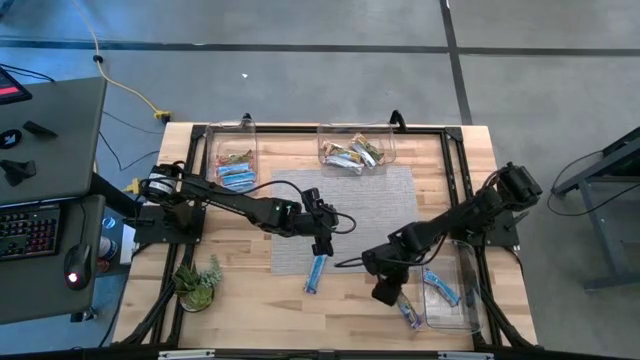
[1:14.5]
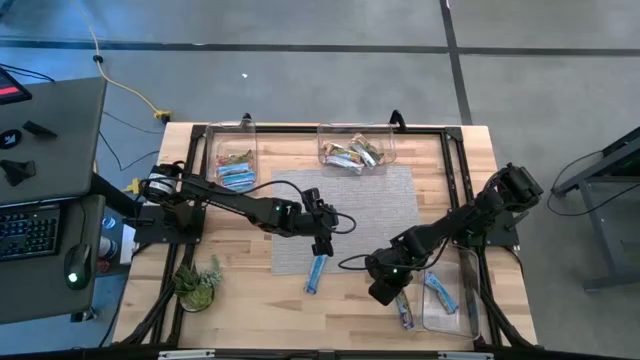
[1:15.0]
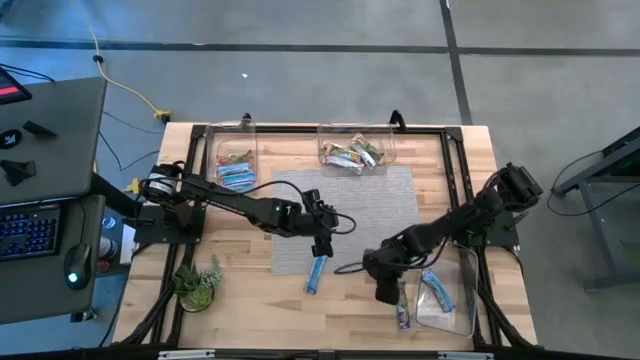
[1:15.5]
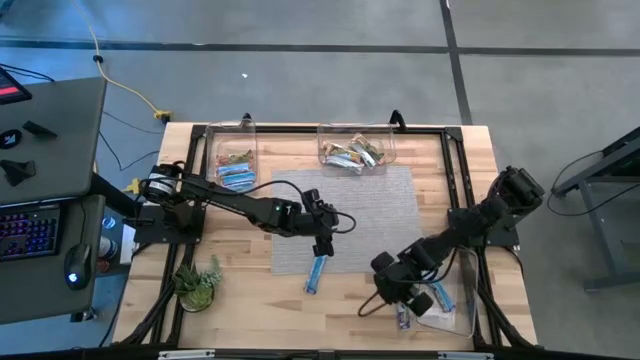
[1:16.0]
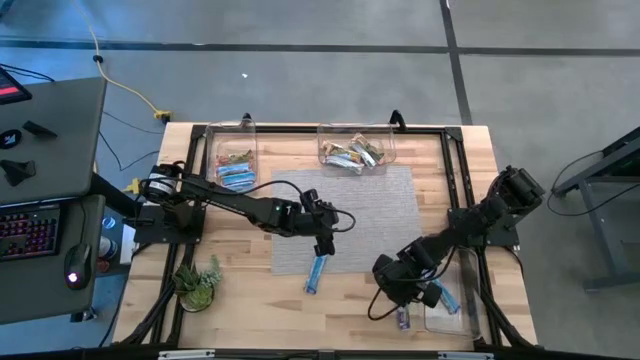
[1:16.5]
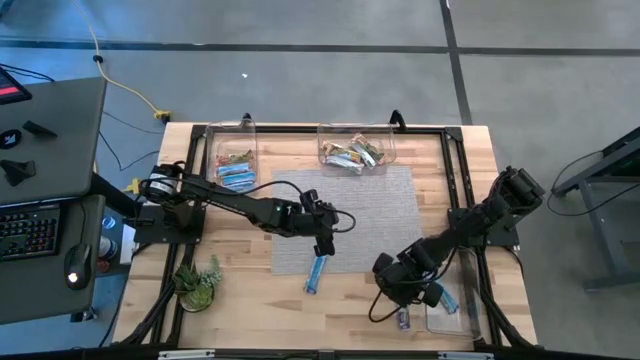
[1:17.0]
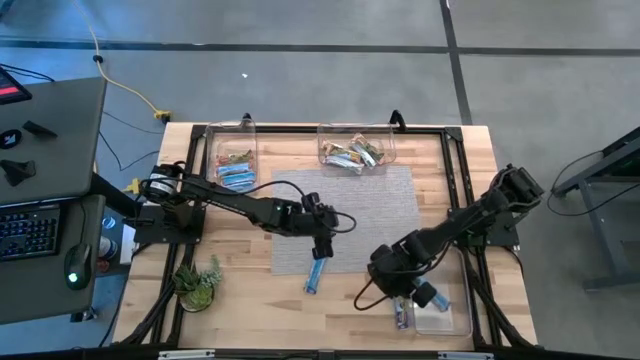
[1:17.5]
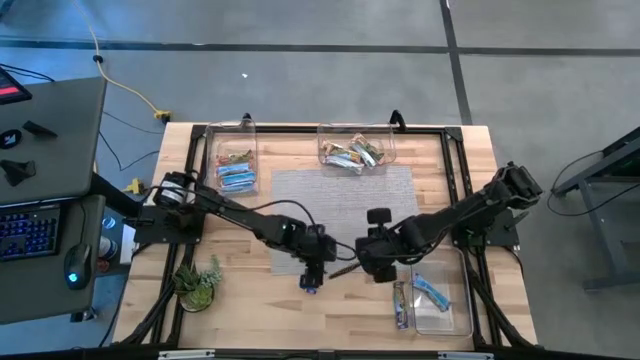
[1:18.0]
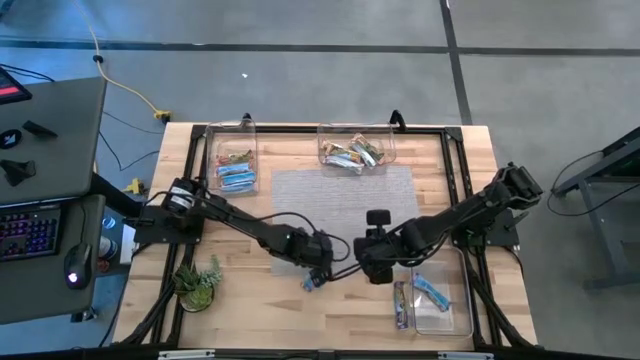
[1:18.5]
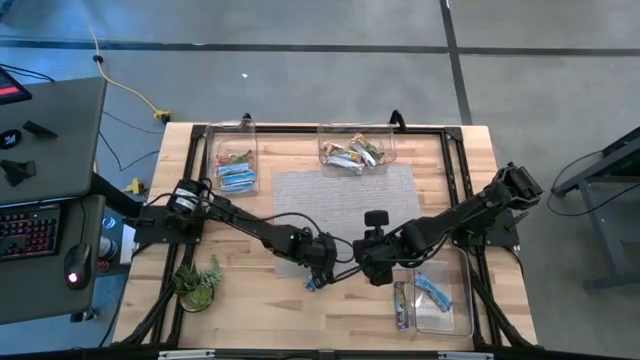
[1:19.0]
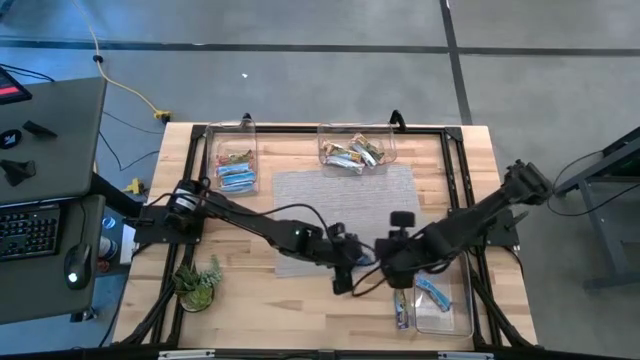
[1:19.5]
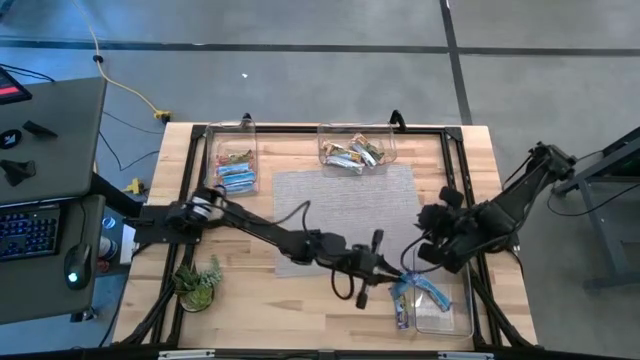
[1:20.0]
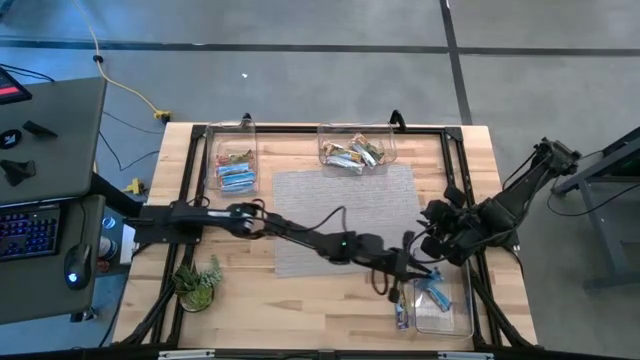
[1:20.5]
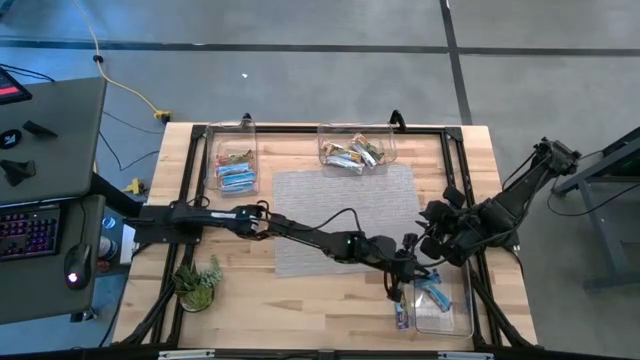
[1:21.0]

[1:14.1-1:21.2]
Task: Pick and place Granola Bars by type
Put the blue granola bar into the bottom transparent bin

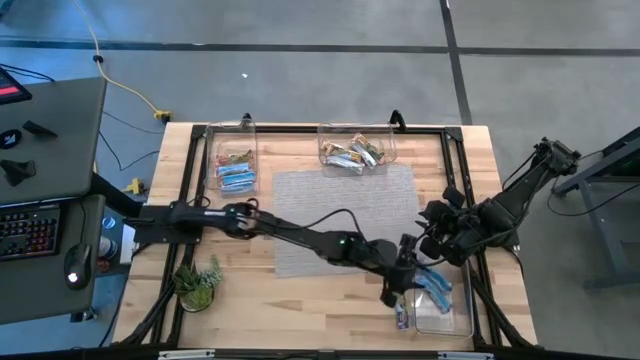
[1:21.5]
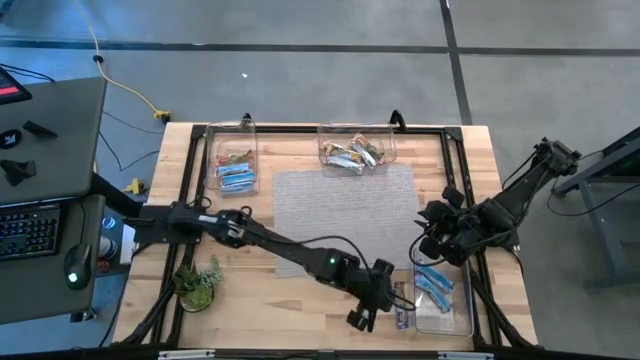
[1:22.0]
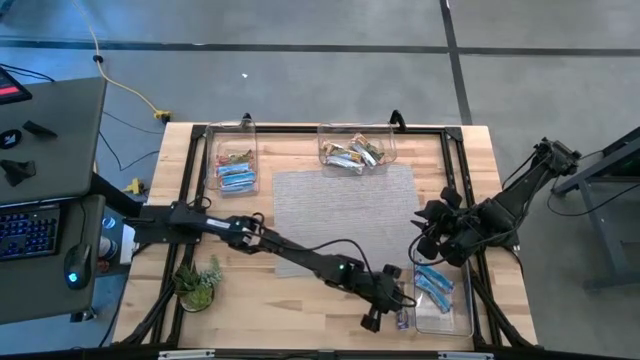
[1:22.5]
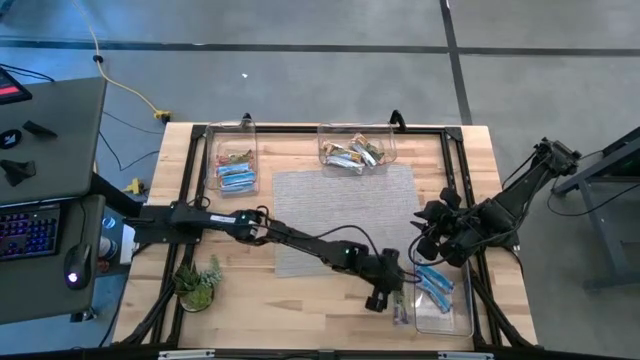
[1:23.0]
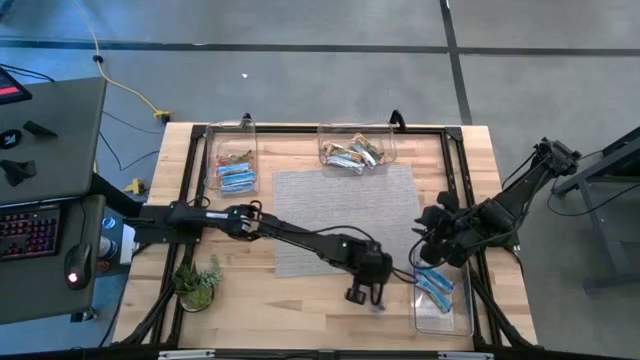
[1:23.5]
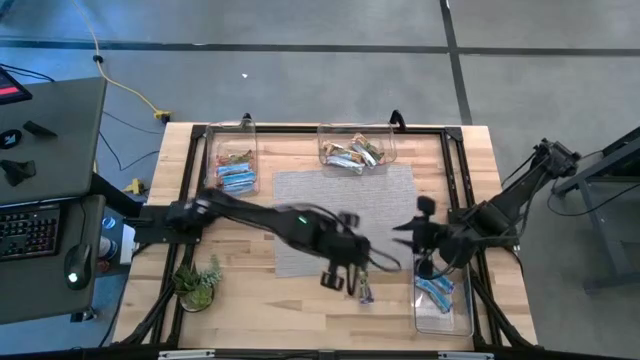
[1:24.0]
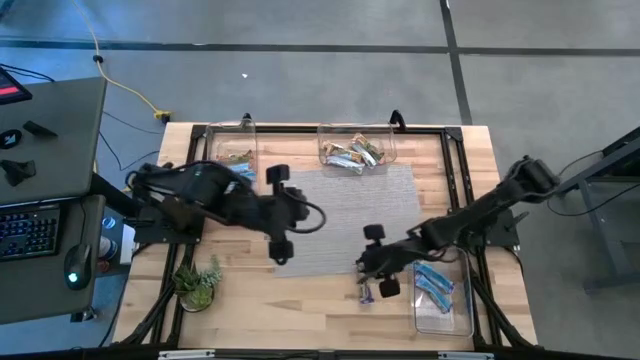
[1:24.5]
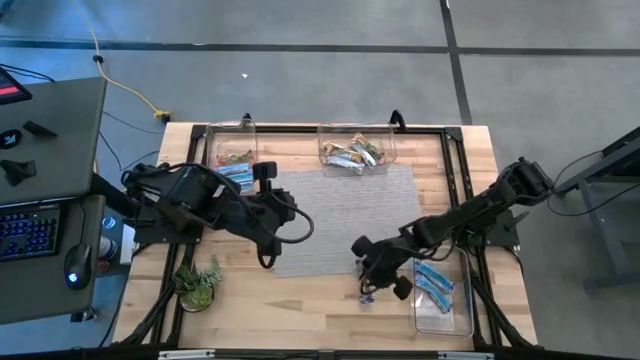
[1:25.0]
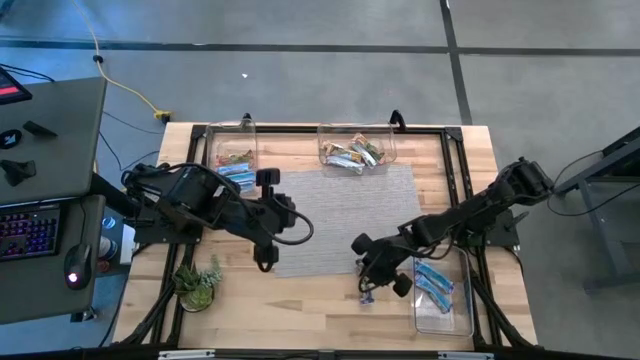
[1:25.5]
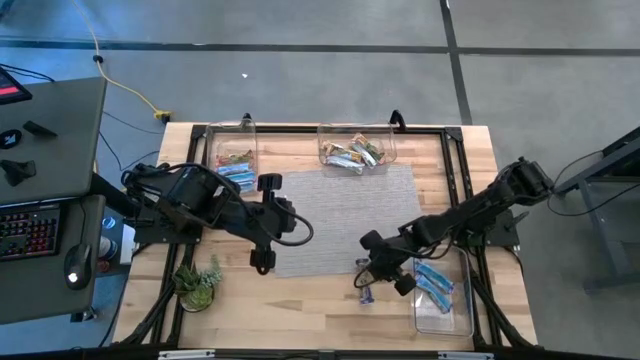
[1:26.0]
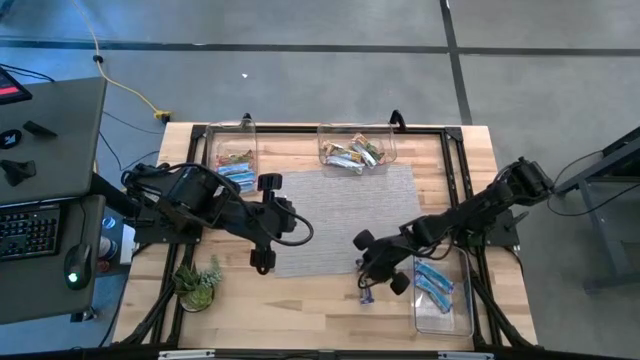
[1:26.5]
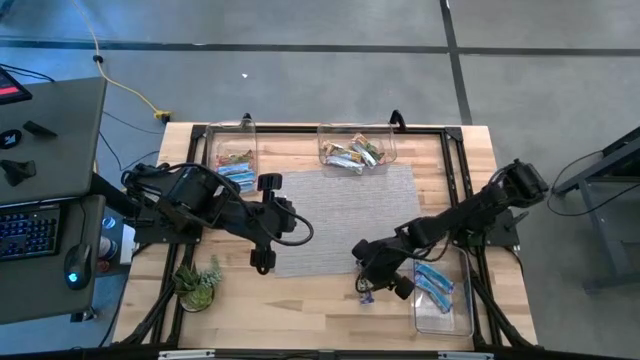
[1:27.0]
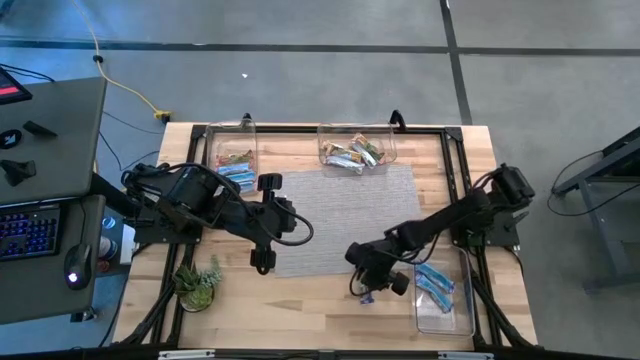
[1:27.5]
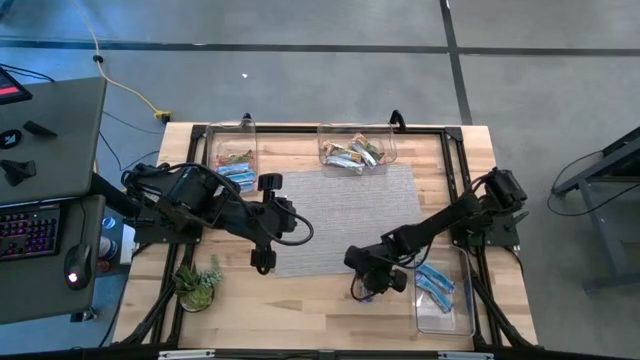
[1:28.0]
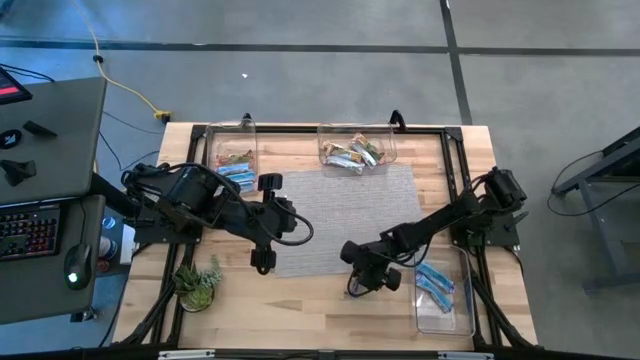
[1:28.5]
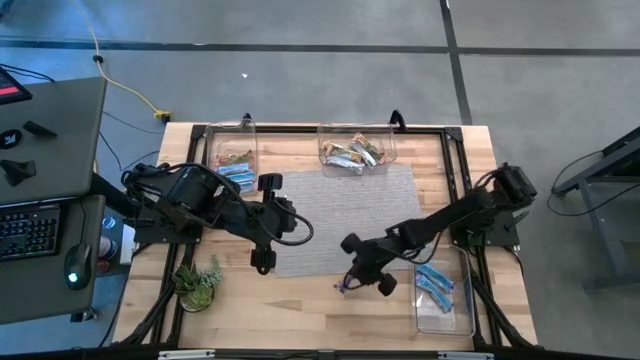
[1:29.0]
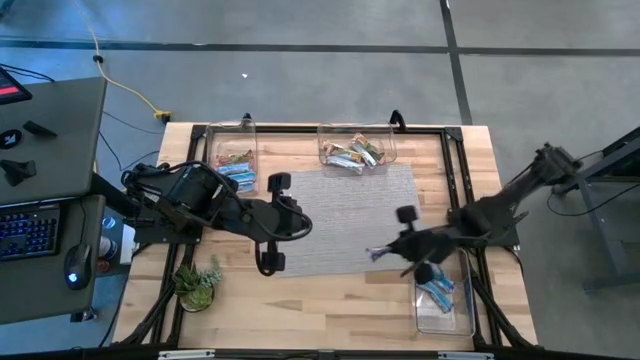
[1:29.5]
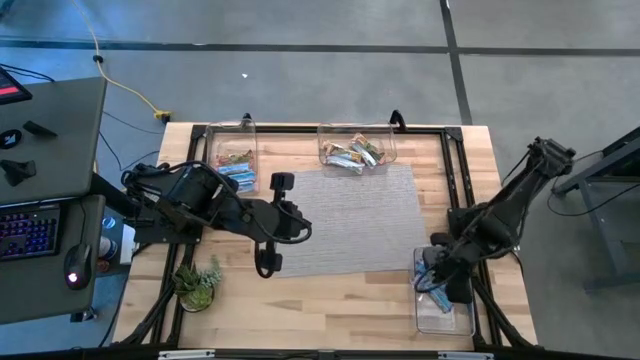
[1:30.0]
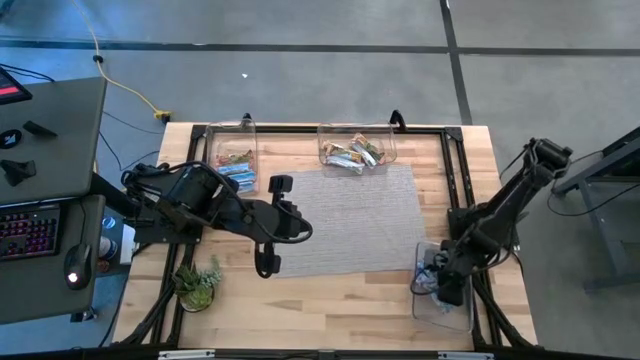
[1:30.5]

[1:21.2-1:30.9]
Put the blue granola bar into the bottom transparent bin

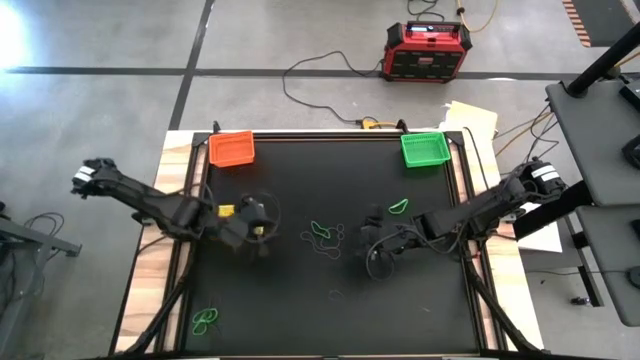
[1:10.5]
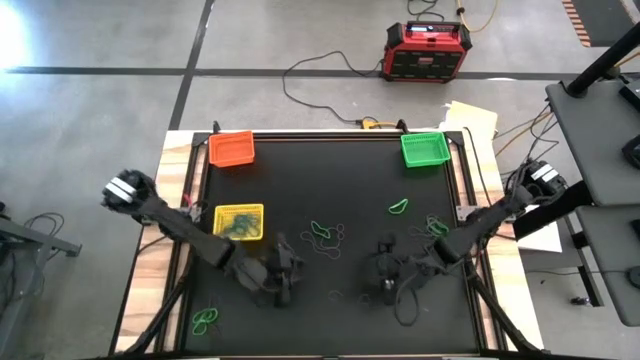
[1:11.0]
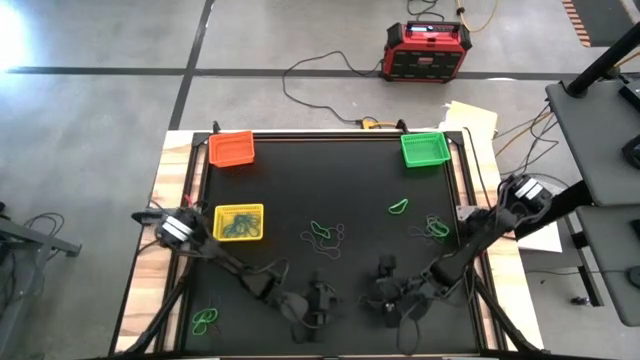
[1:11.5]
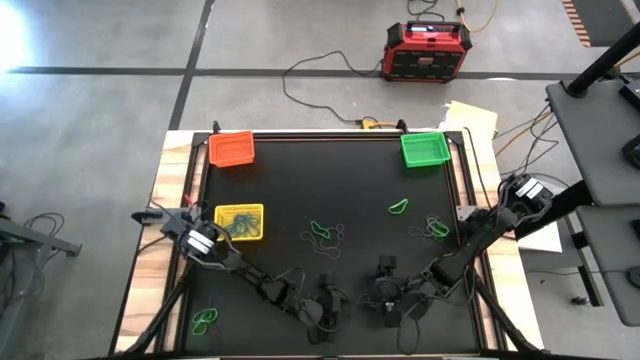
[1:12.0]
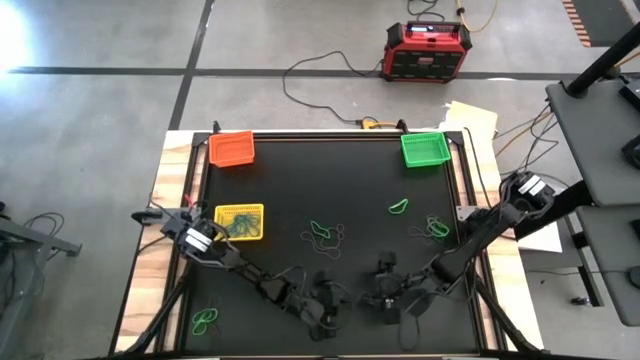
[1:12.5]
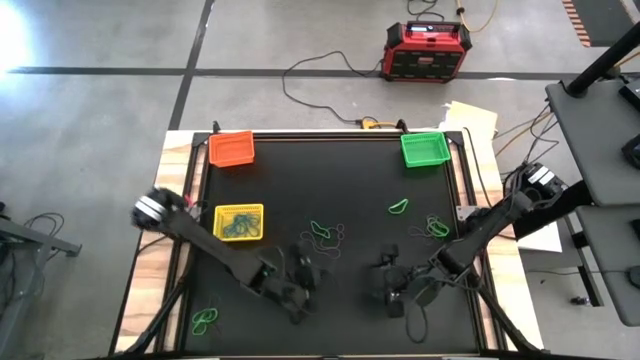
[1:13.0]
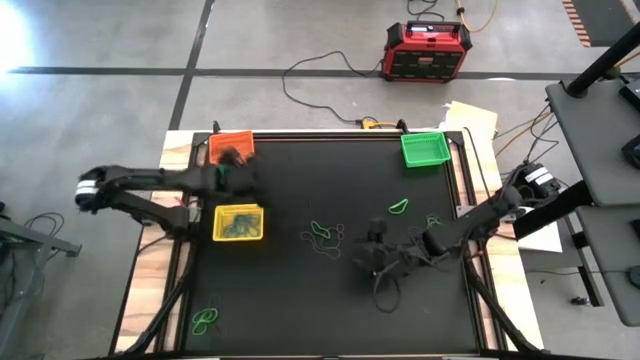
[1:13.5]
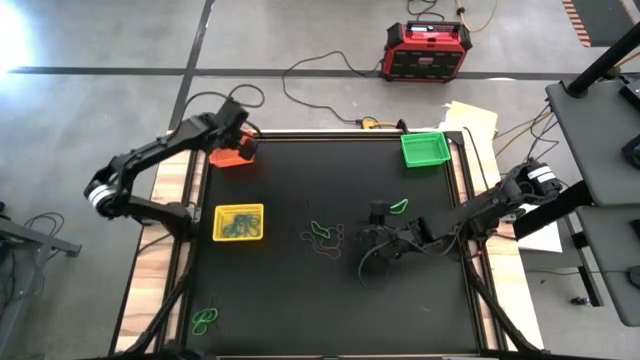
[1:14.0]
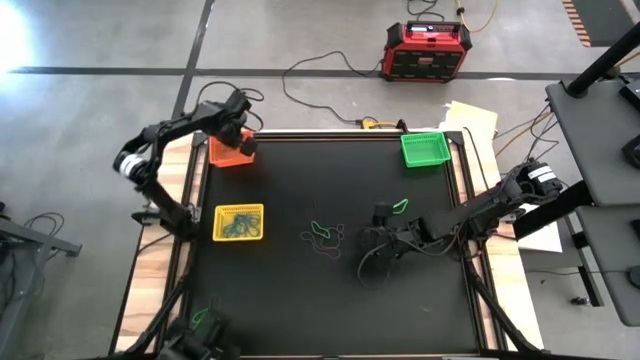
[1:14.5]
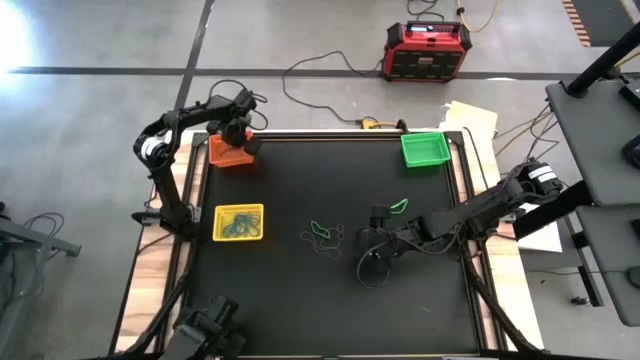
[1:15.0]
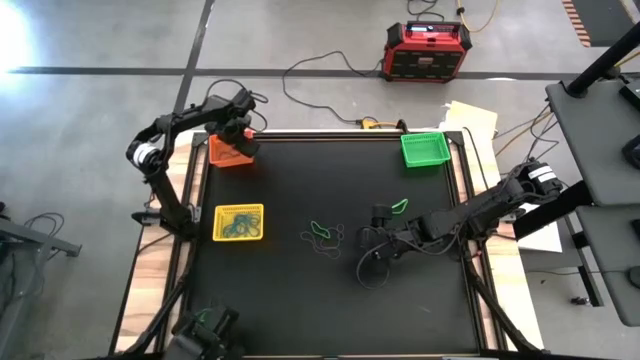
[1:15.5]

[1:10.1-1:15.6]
Task: Sort rubber bands into baskets
Put the purple rubber band into the orange bin
